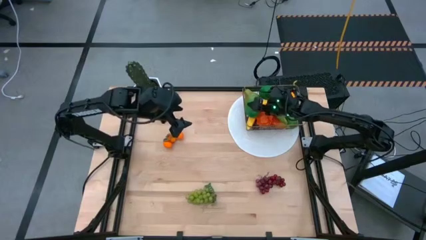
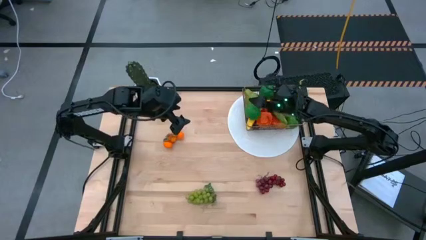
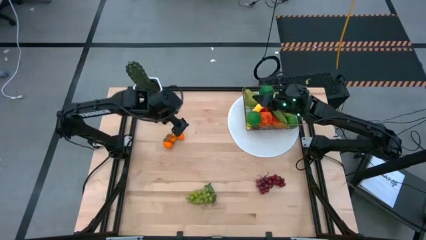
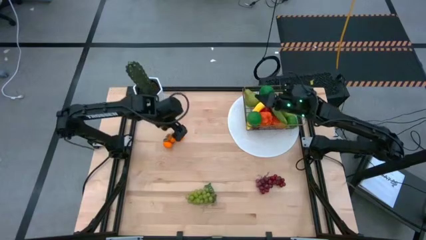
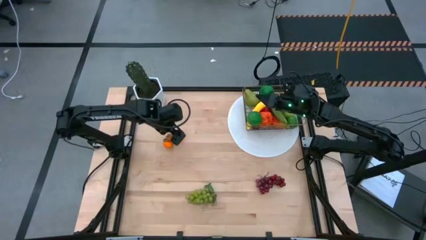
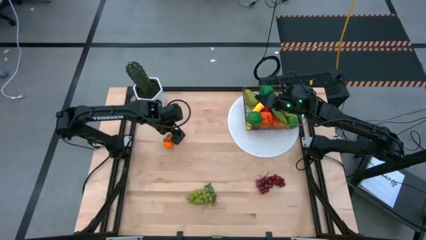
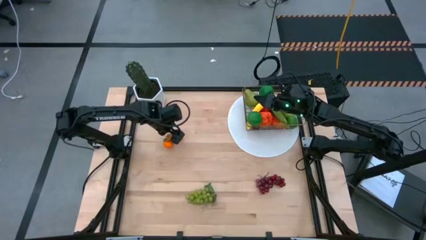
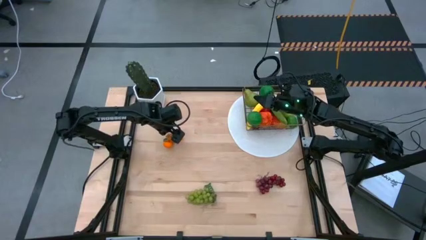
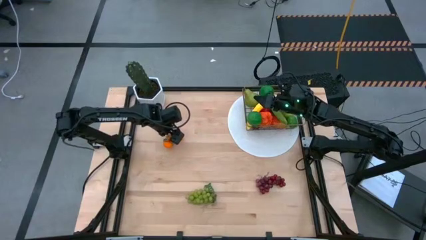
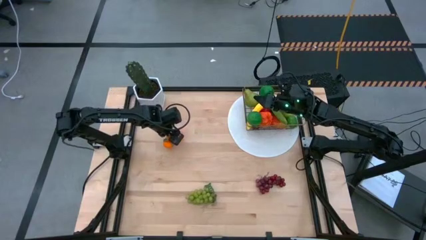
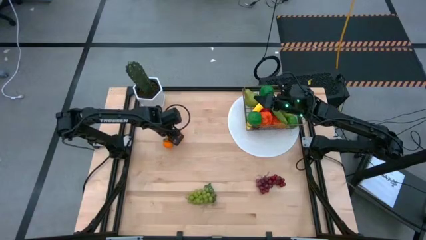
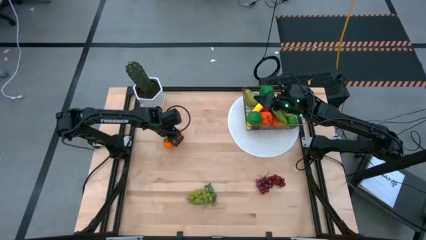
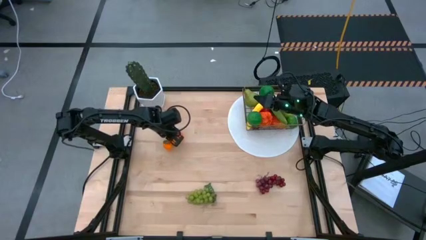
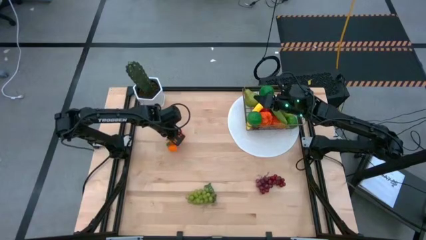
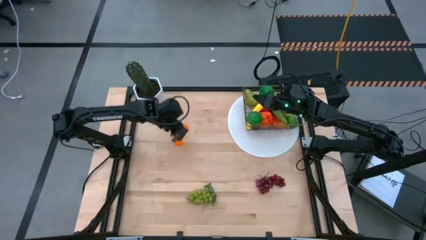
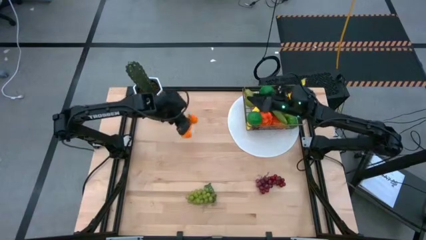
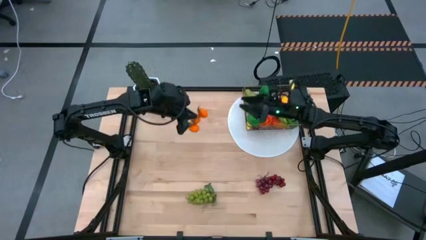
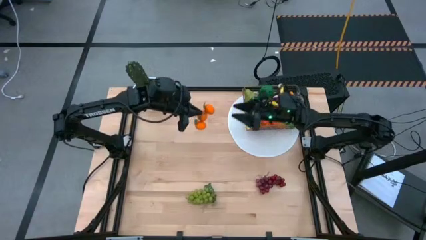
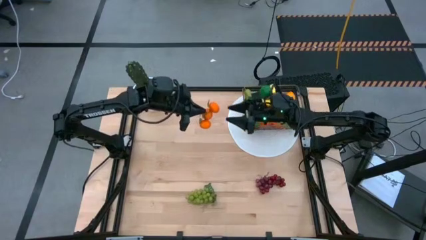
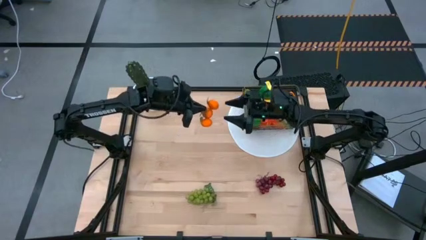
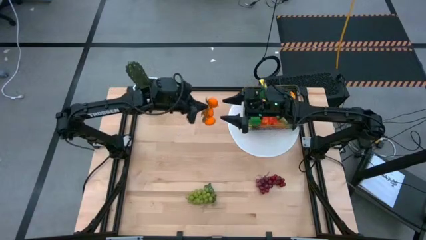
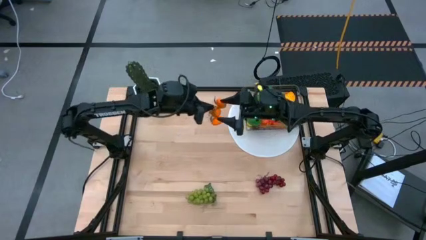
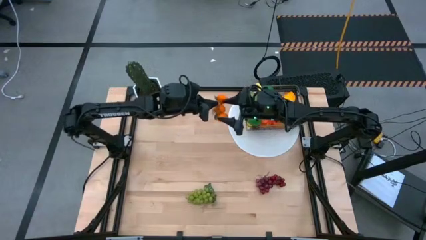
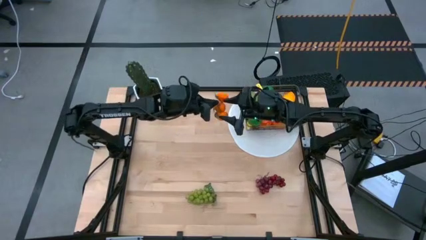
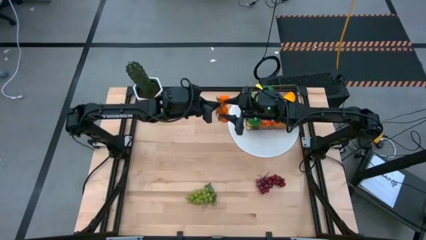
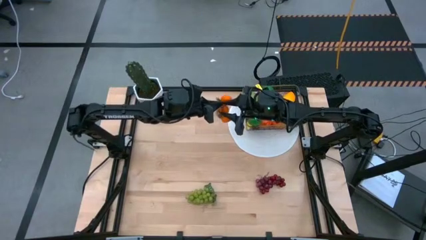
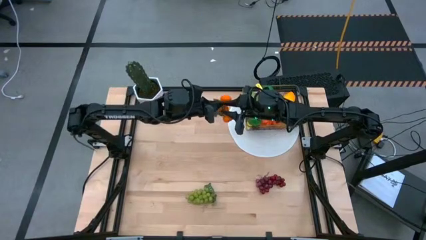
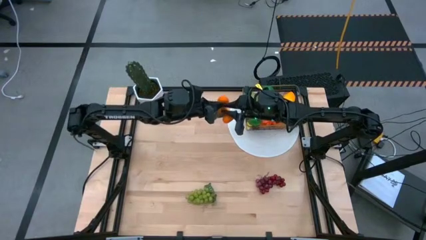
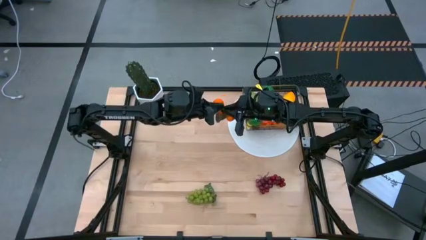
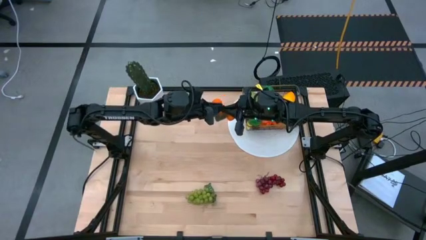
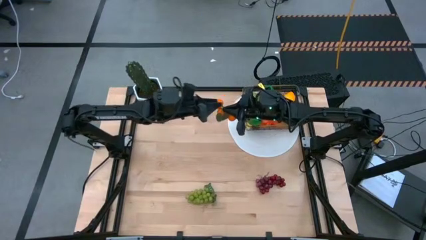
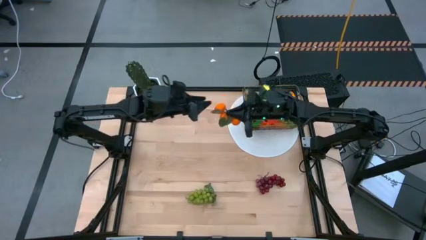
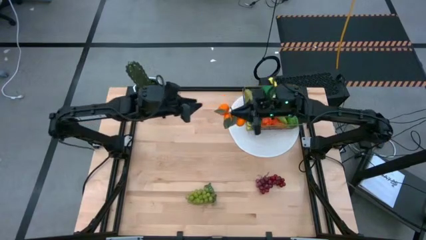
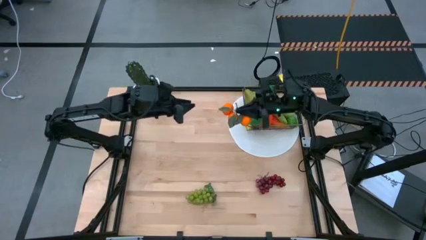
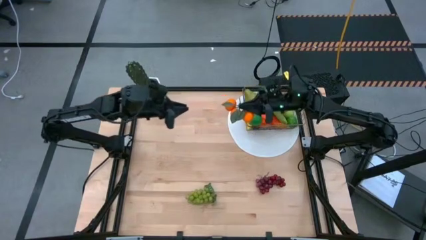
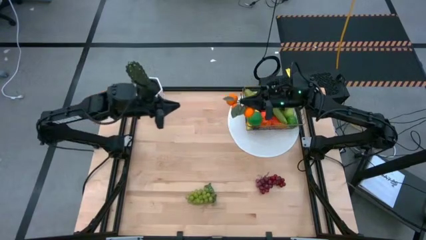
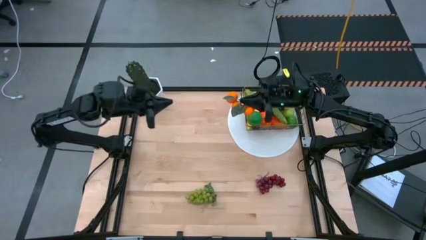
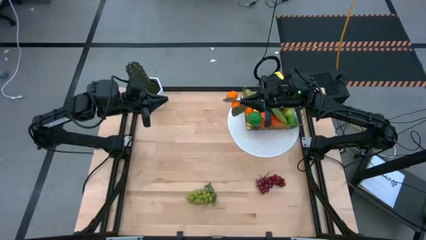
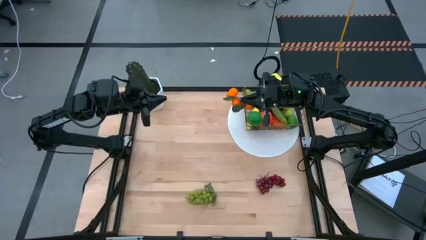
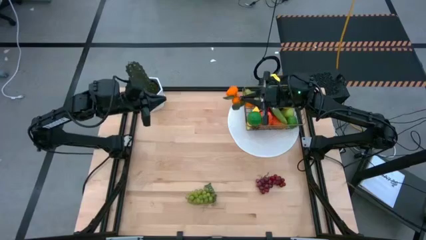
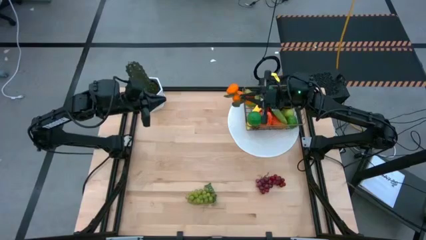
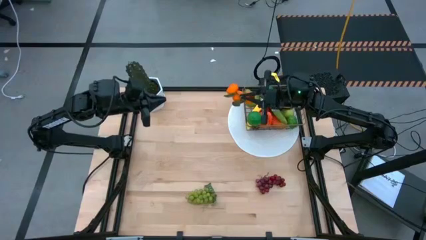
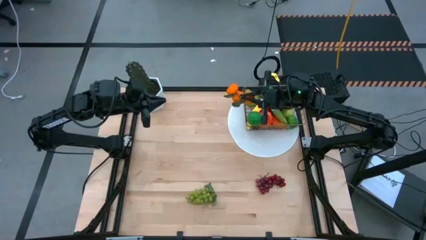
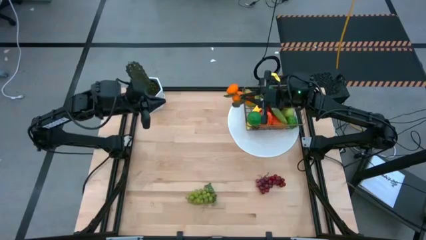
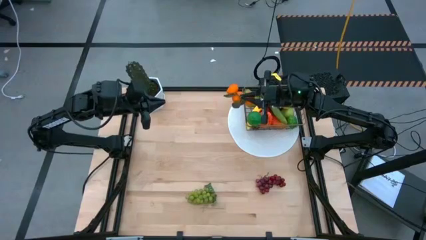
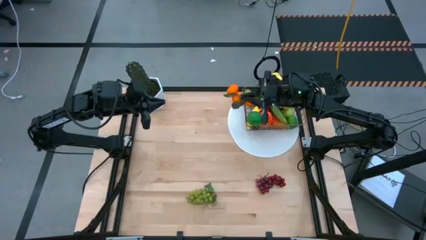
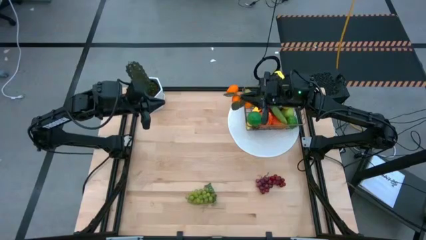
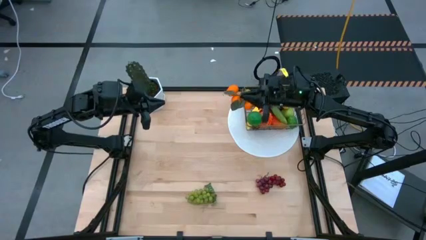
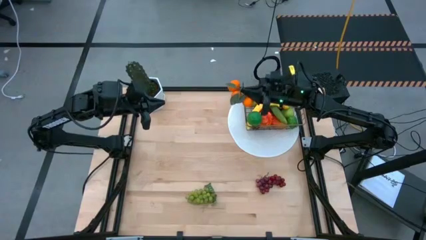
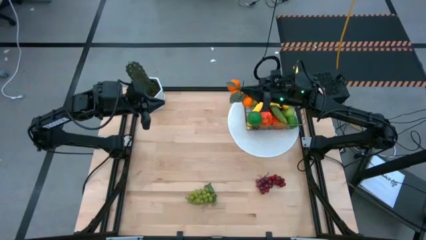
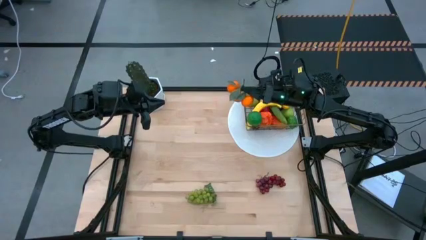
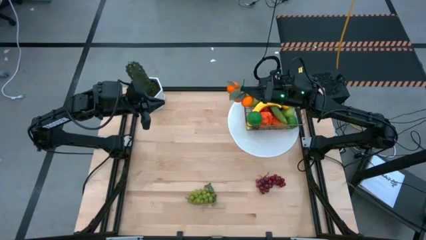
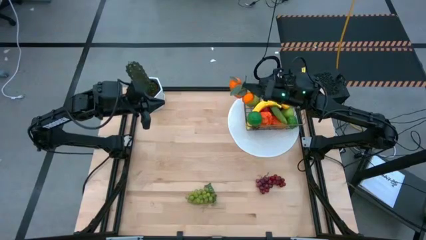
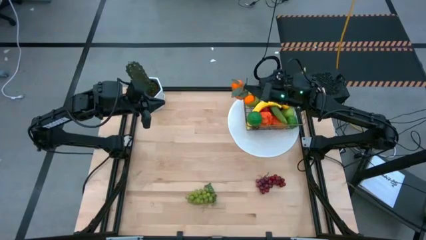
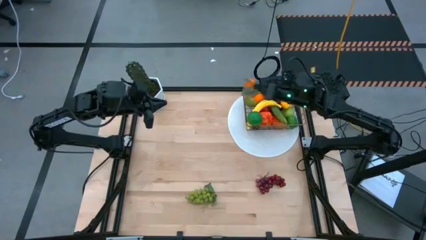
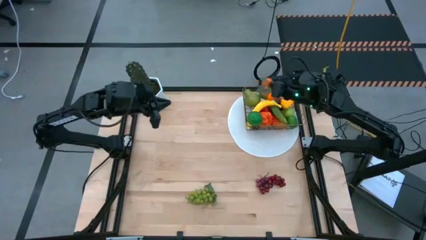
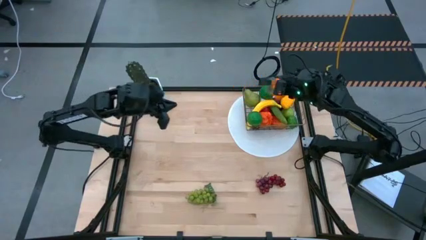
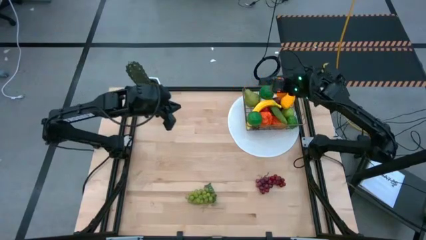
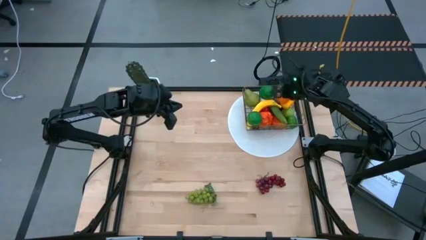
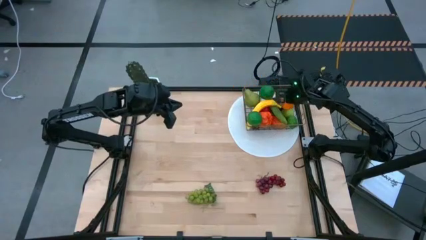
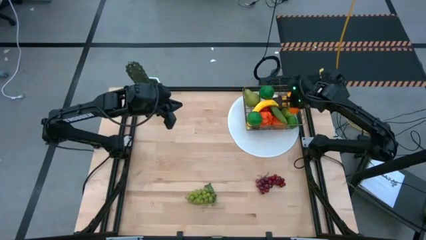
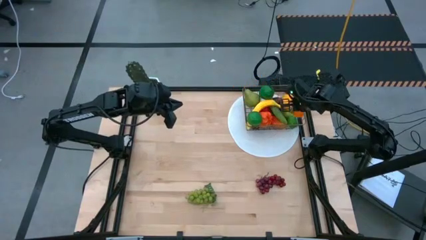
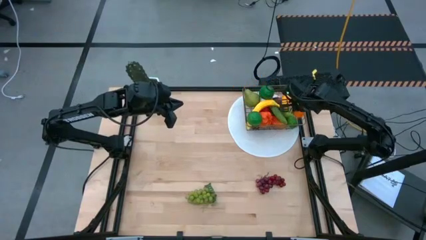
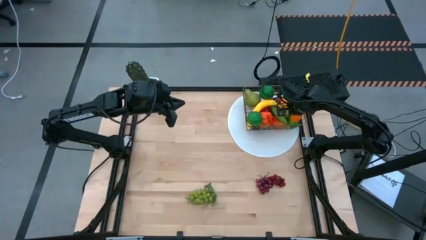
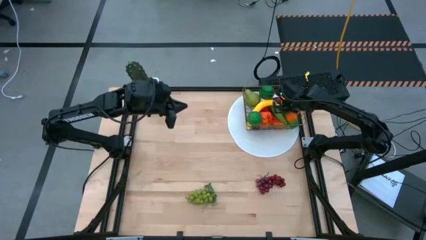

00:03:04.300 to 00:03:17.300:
Task: Build produce basket
Put the orange tangerines into the gold wire basket
